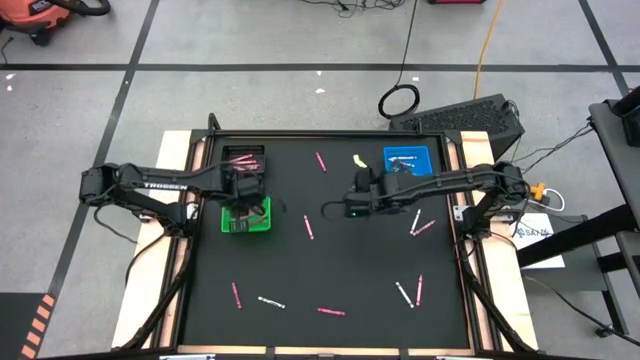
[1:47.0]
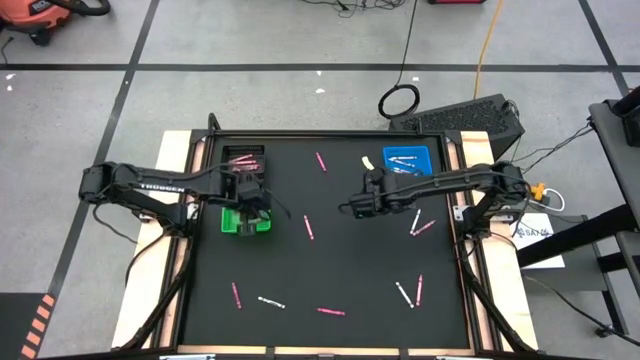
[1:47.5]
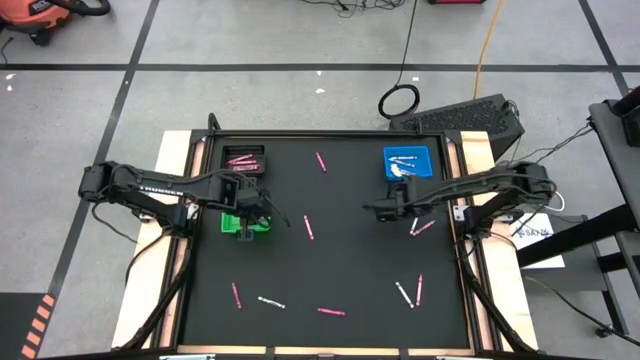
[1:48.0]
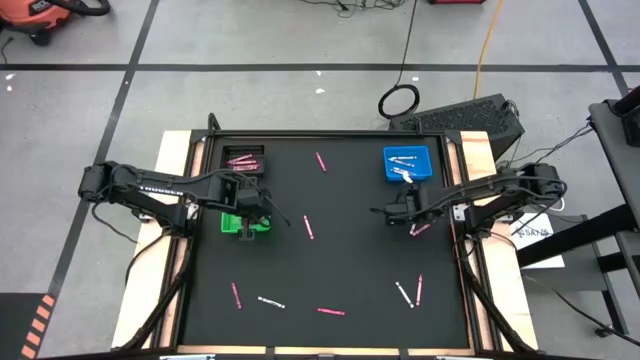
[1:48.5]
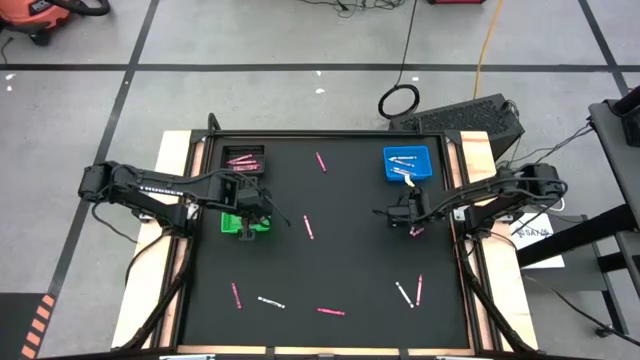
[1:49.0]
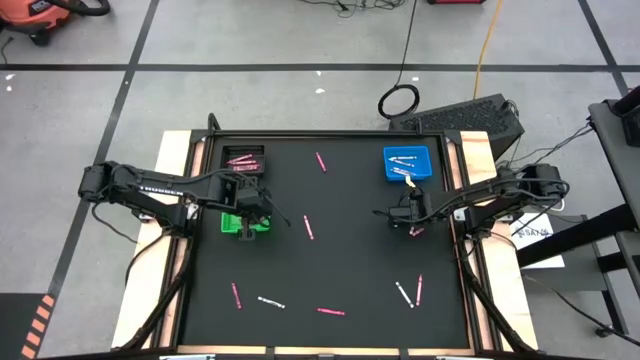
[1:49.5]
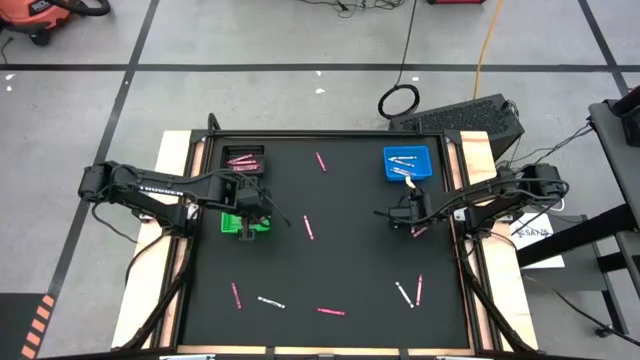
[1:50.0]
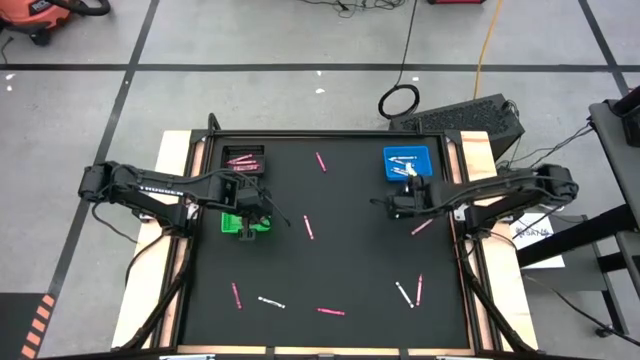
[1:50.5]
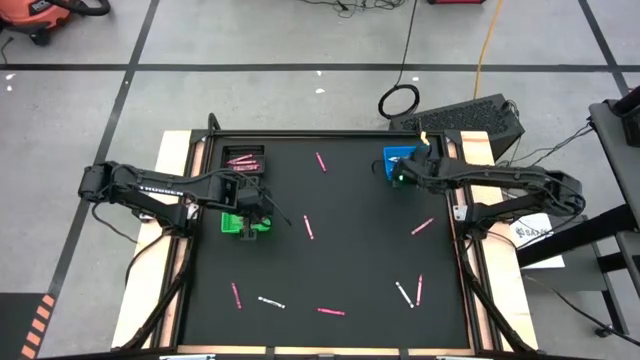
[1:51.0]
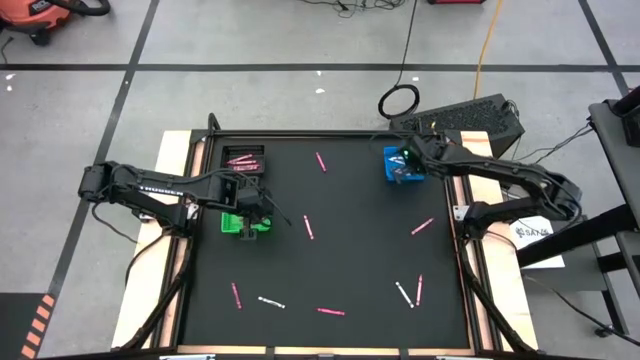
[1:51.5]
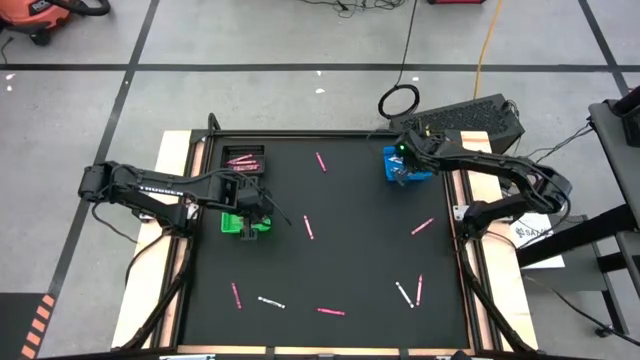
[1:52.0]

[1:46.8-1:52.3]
Task: Sort crayons
Put the white crayon into the blue bin

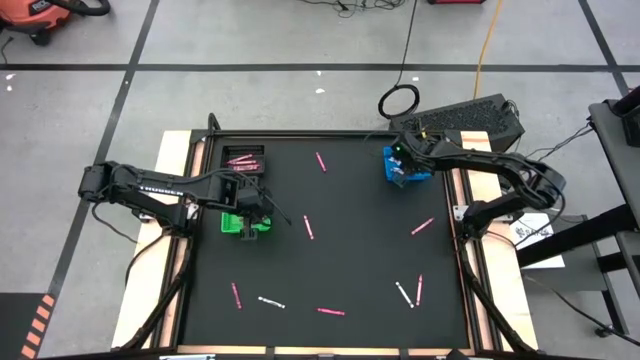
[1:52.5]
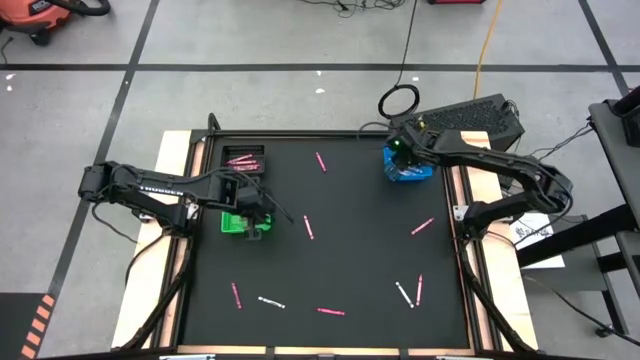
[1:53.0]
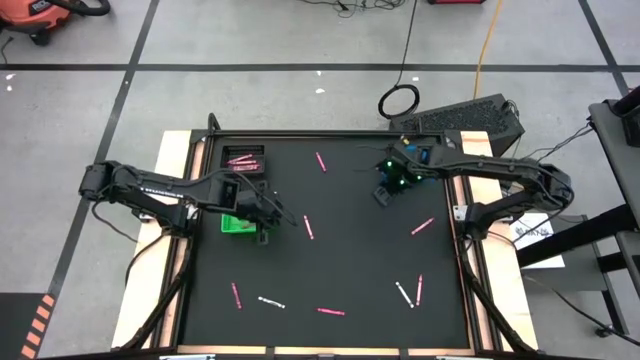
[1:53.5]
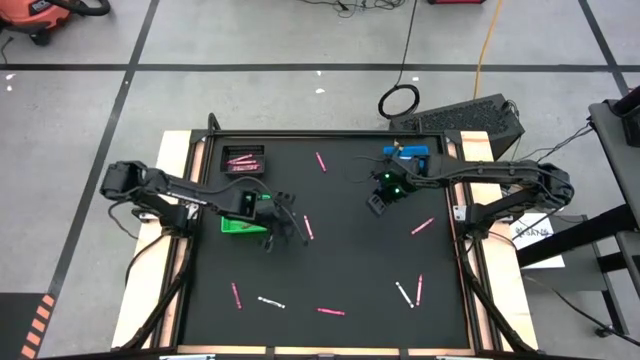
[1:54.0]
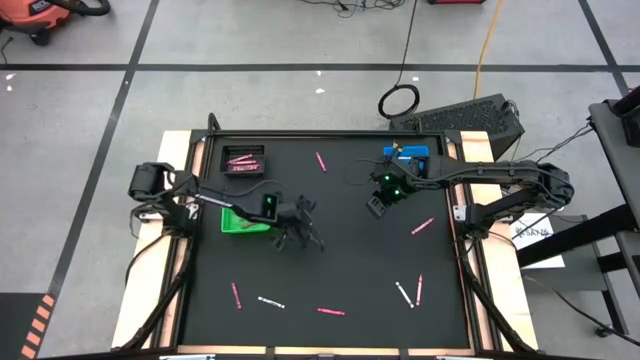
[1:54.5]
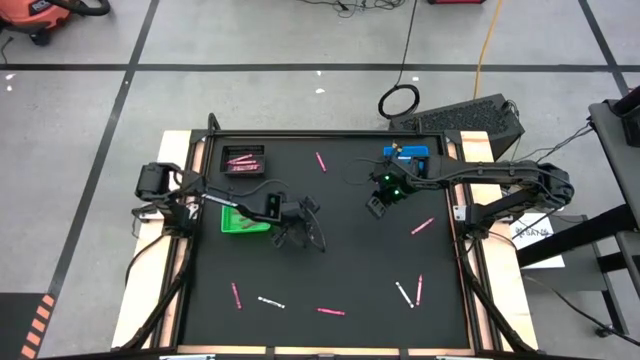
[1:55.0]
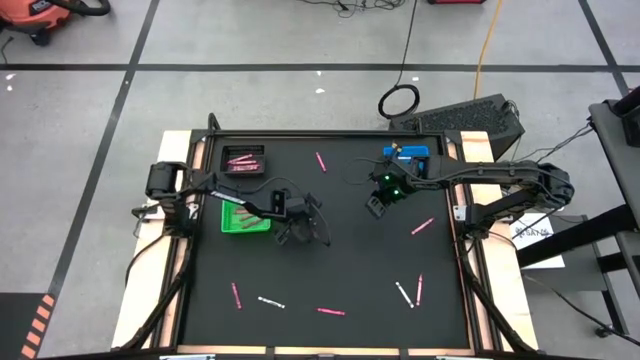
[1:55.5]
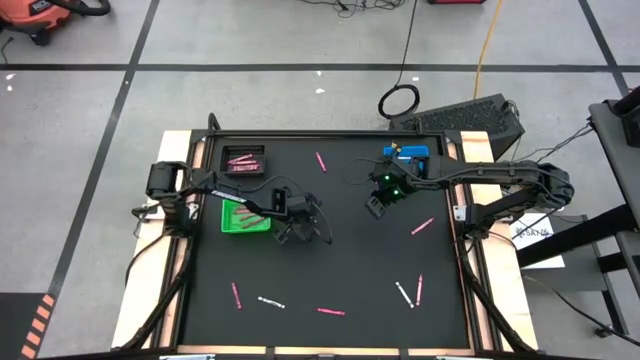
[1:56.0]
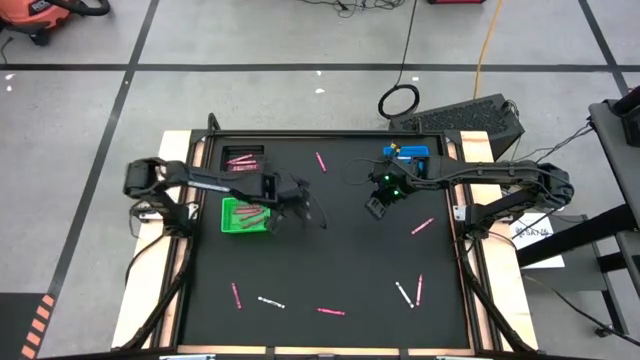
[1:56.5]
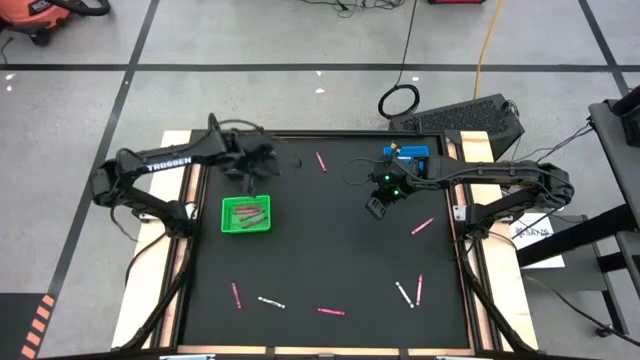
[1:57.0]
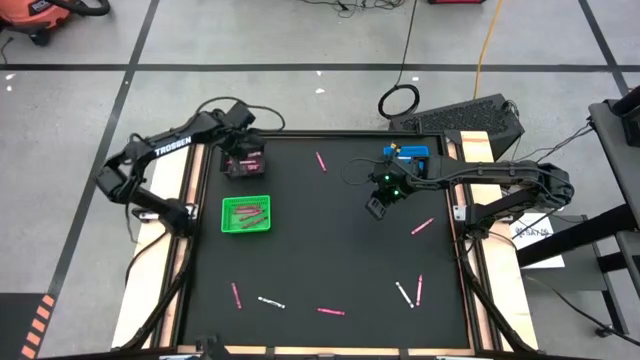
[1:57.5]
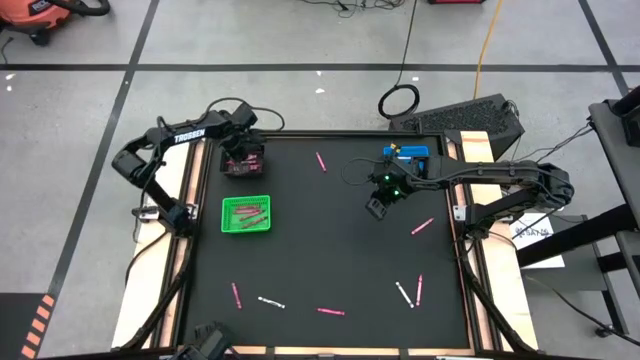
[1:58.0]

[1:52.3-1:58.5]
Put the pink crayon into the black bin

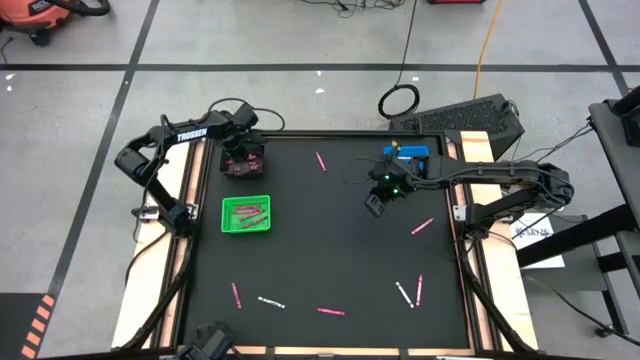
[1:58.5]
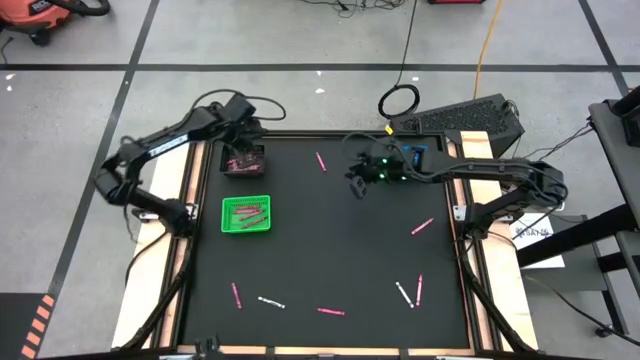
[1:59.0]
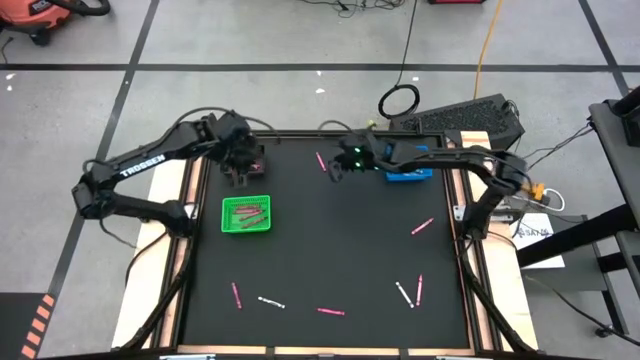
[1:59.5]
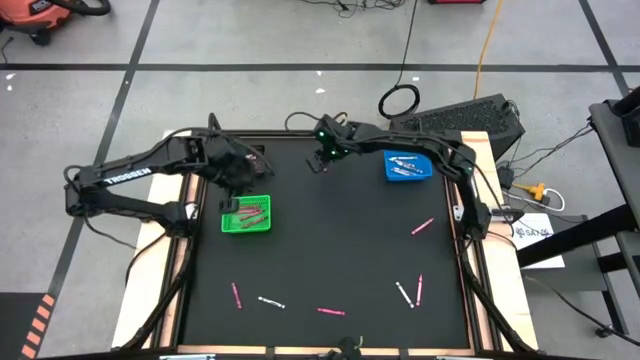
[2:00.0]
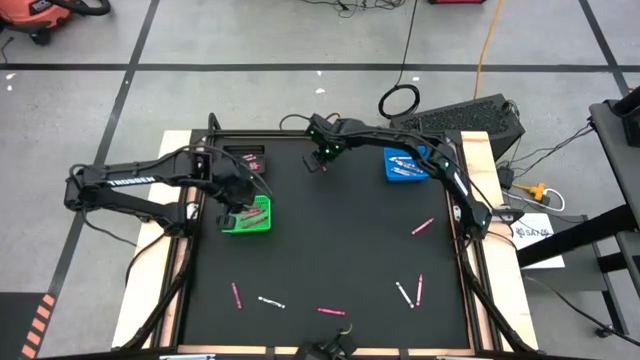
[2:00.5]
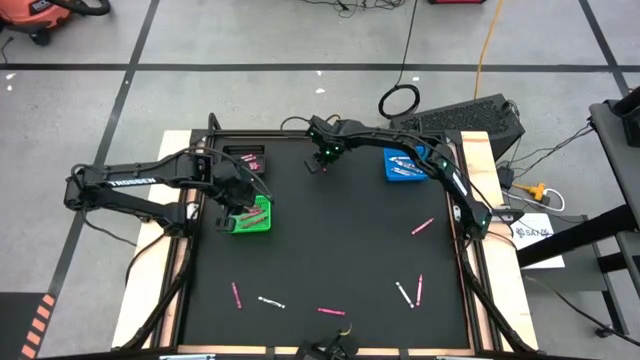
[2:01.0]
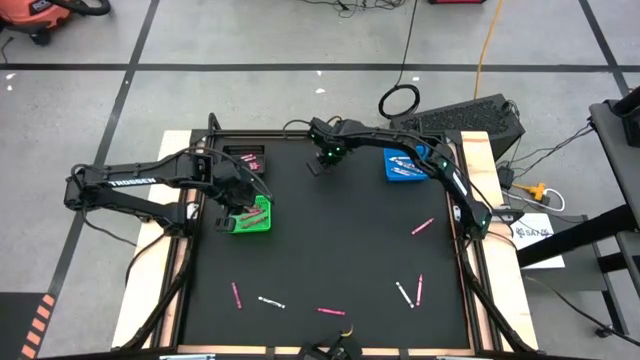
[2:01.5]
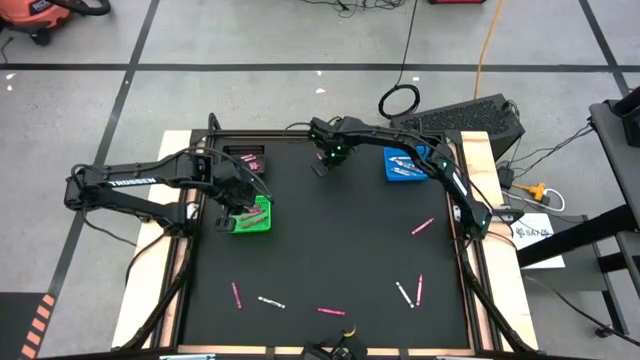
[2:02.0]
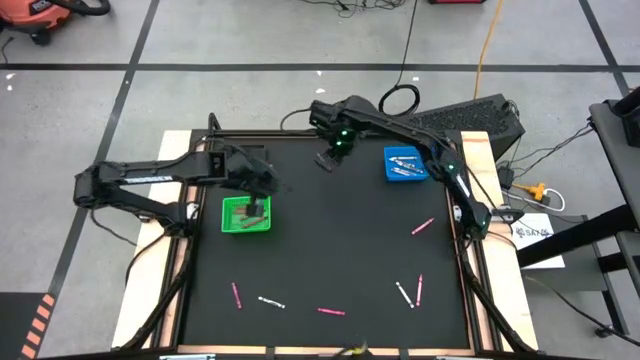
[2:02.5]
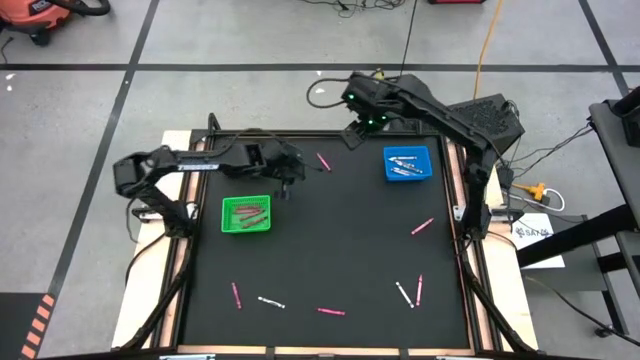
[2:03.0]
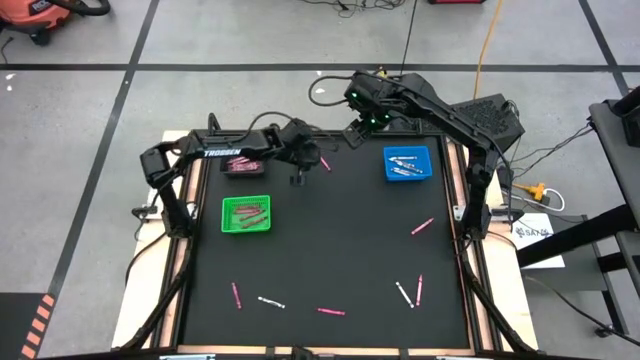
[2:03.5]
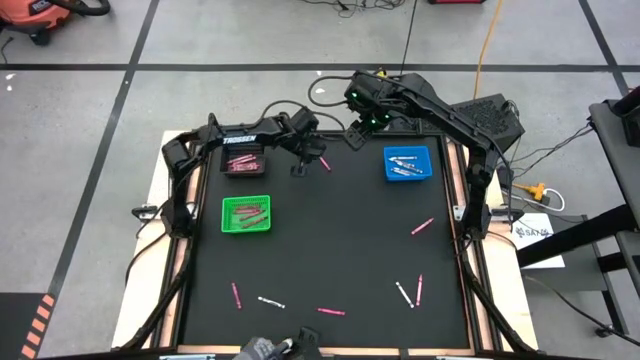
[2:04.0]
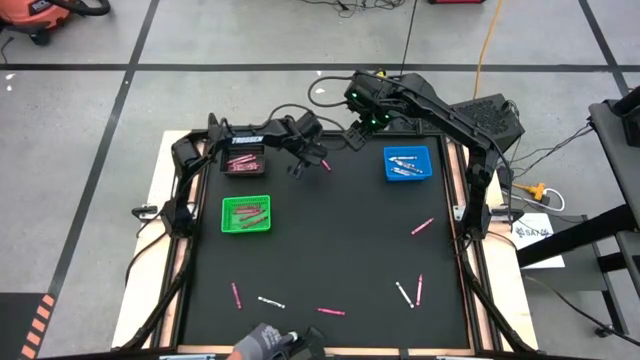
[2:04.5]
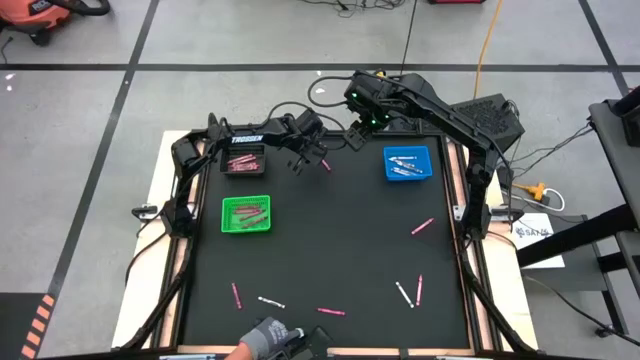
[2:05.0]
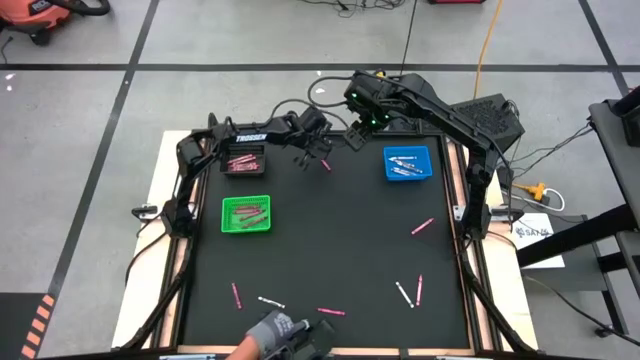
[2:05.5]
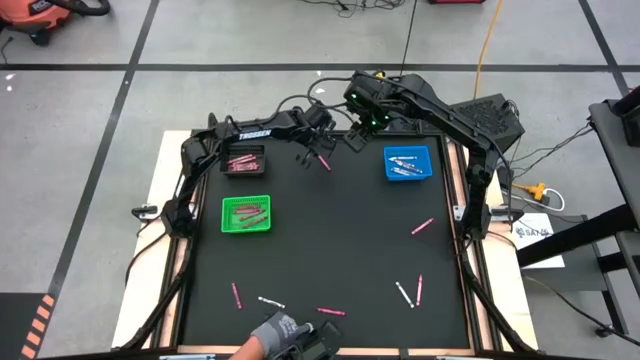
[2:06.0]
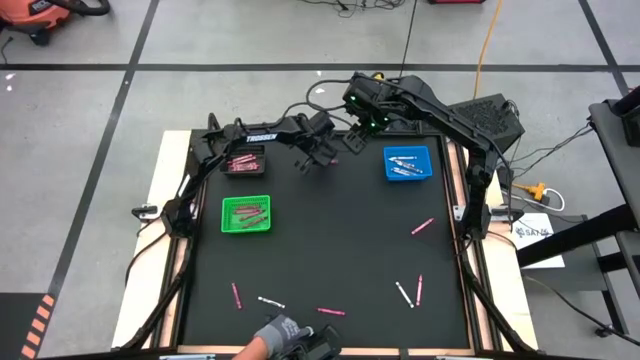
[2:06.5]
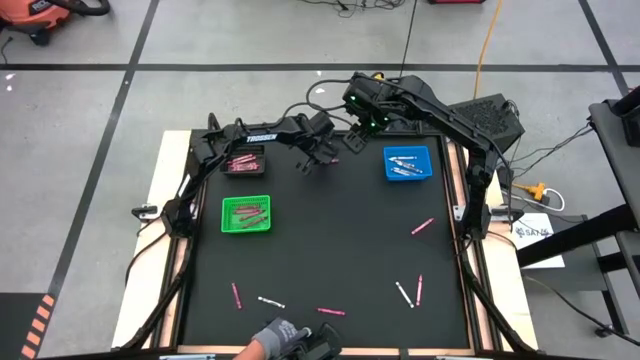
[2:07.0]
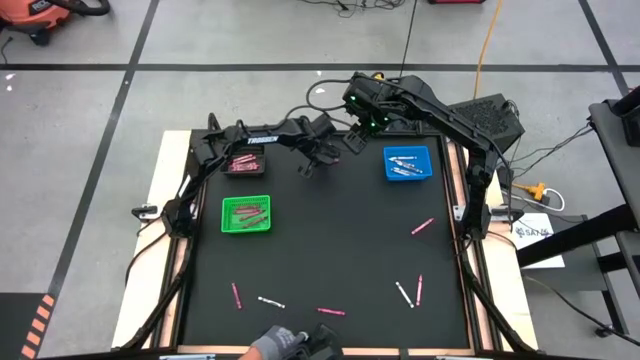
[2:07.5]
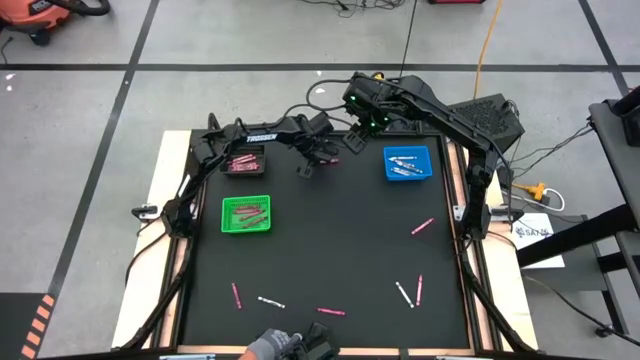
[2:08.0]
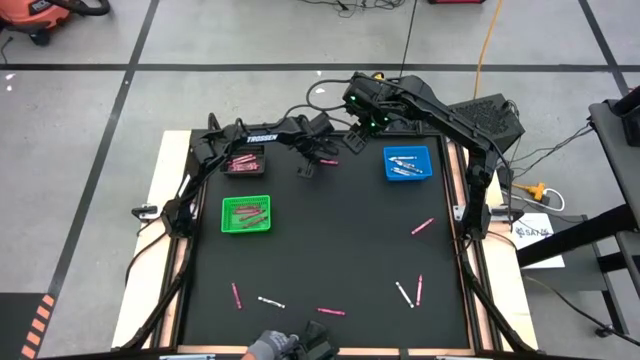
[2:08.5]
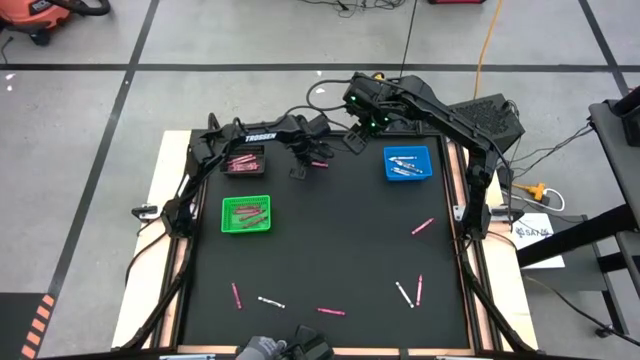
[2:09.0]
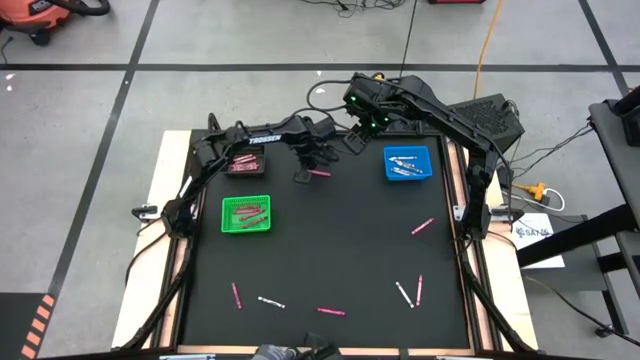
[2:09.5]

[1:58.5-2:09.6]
Put the red crayon into the green bin
